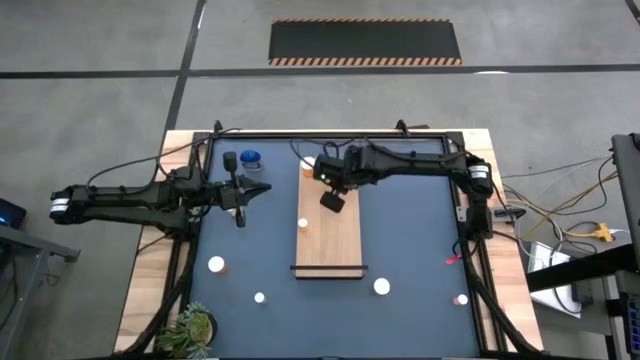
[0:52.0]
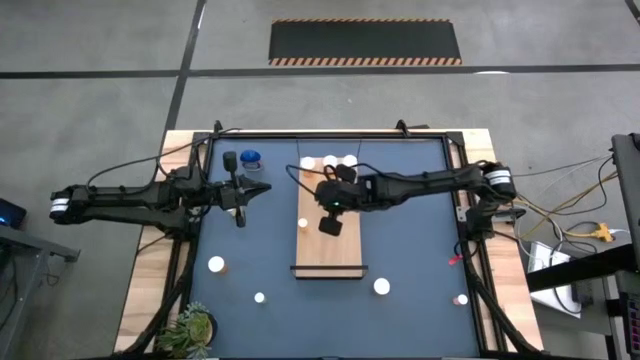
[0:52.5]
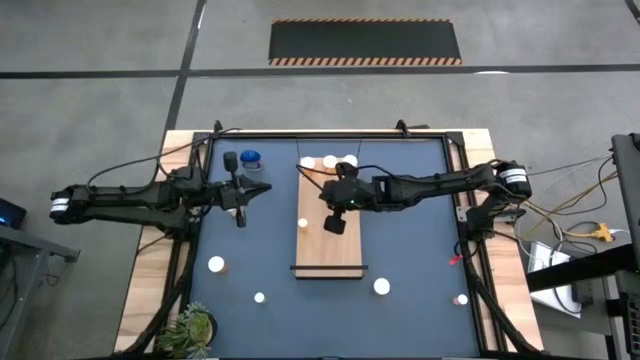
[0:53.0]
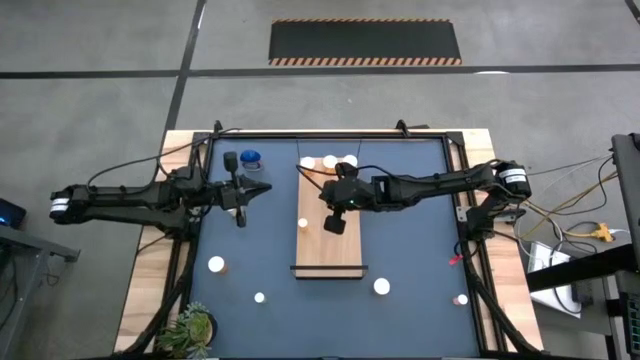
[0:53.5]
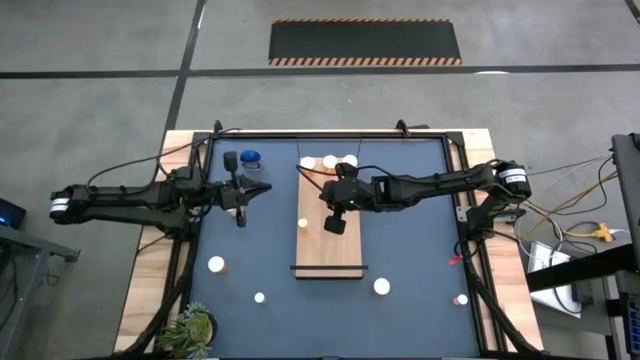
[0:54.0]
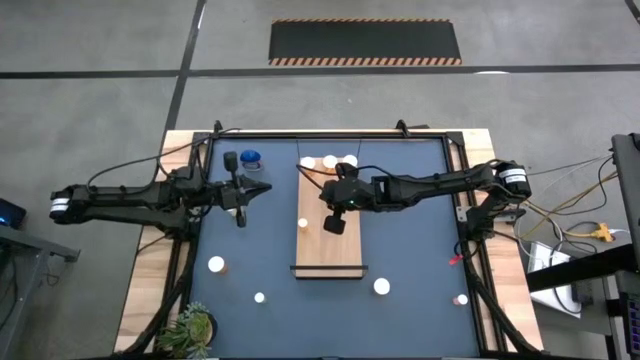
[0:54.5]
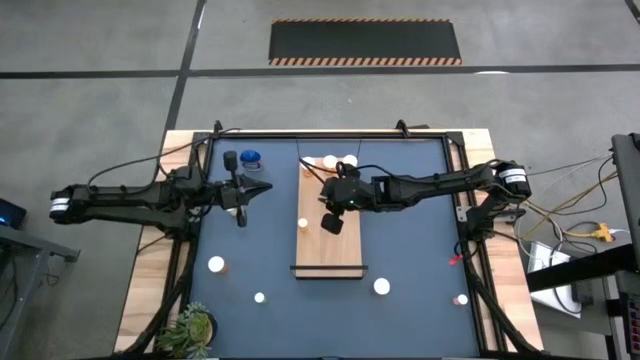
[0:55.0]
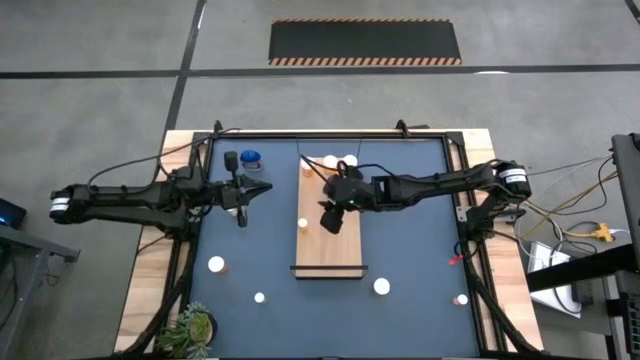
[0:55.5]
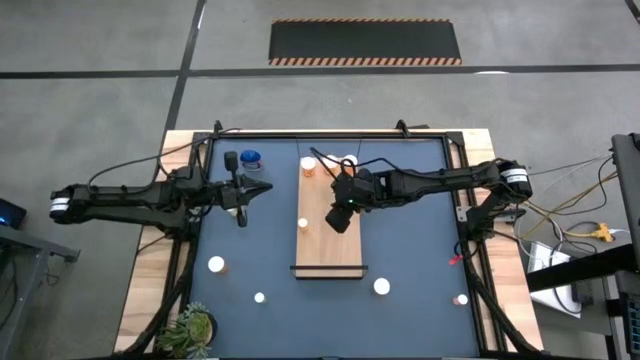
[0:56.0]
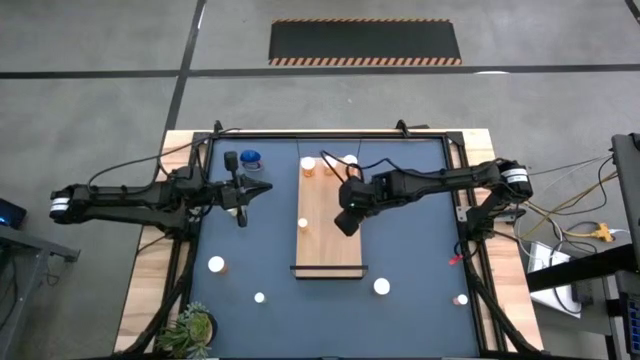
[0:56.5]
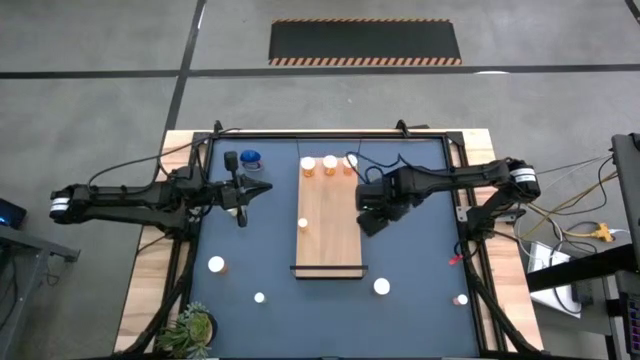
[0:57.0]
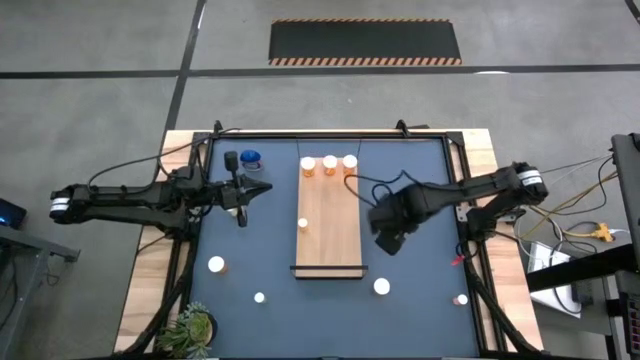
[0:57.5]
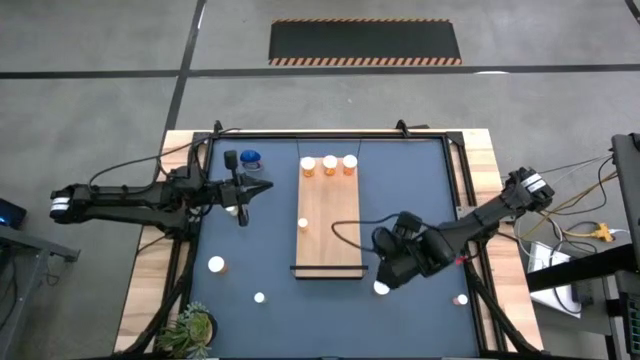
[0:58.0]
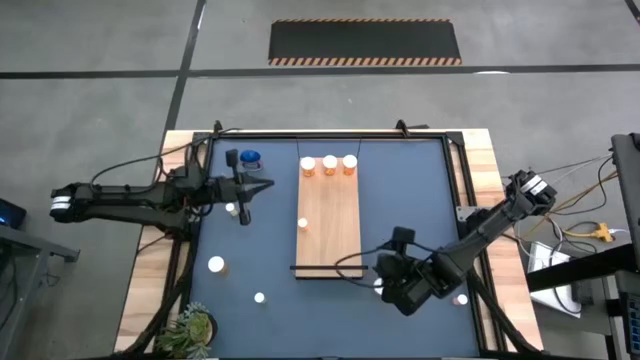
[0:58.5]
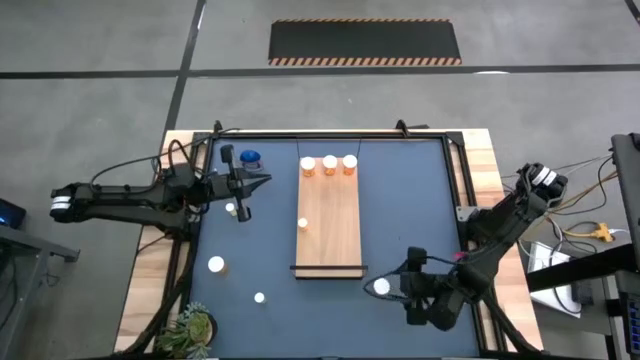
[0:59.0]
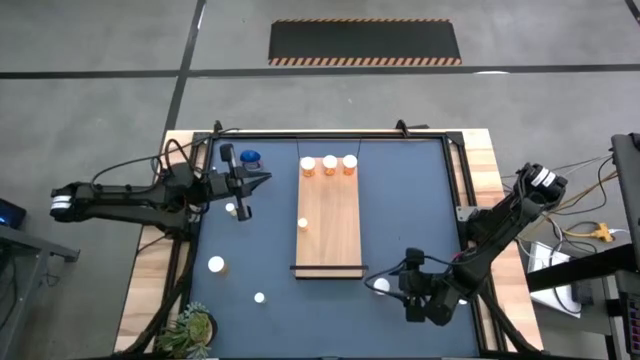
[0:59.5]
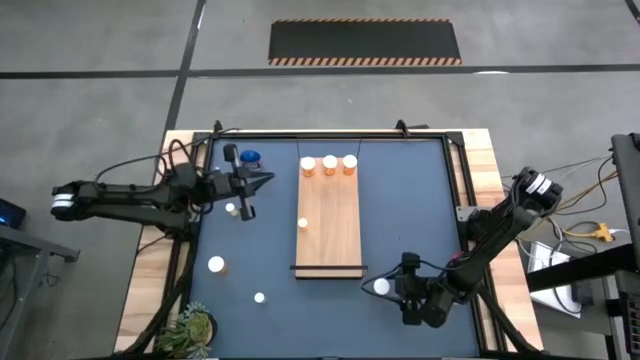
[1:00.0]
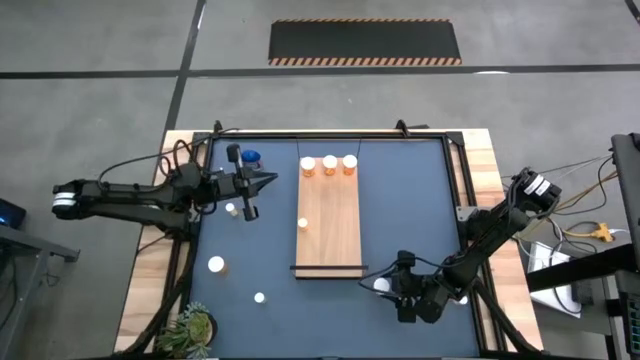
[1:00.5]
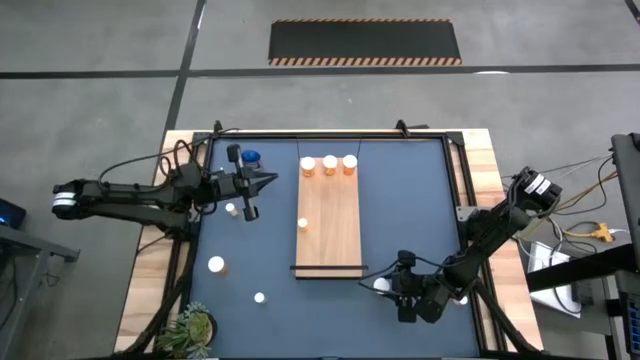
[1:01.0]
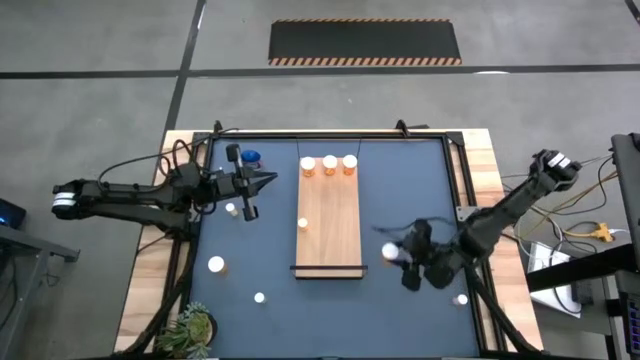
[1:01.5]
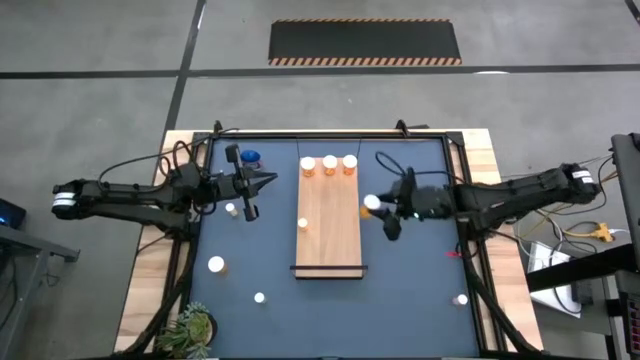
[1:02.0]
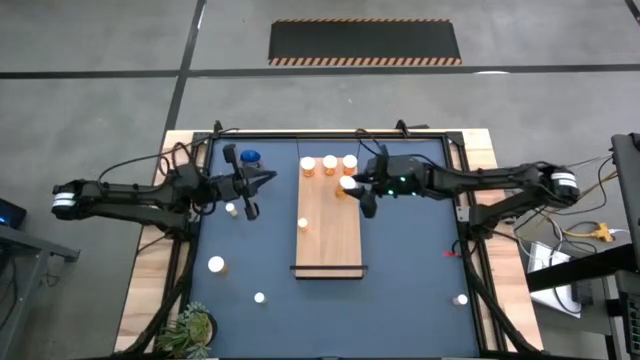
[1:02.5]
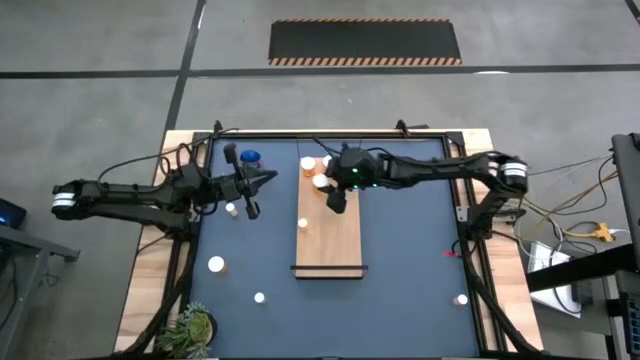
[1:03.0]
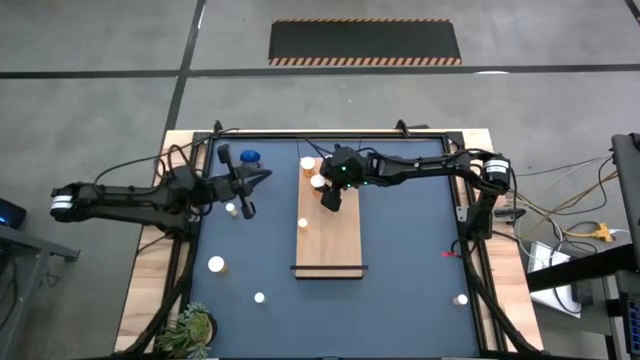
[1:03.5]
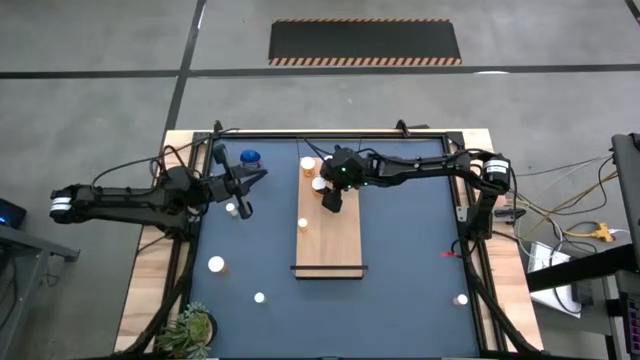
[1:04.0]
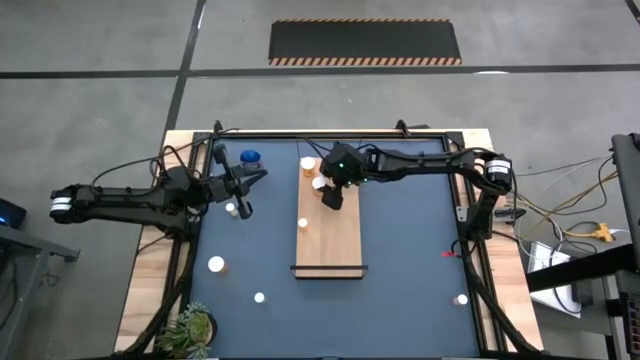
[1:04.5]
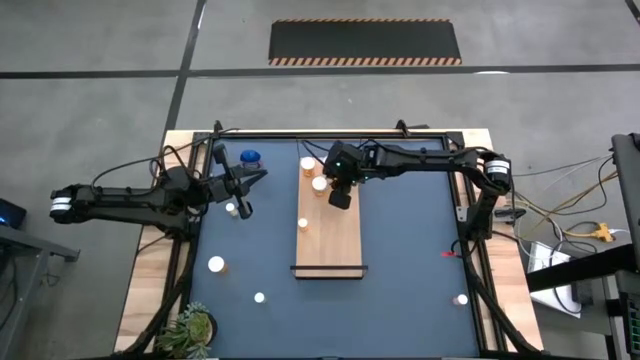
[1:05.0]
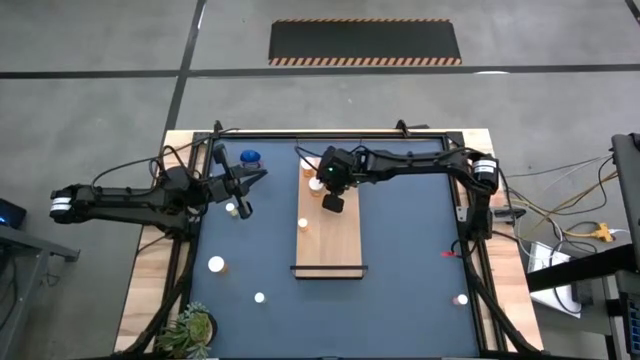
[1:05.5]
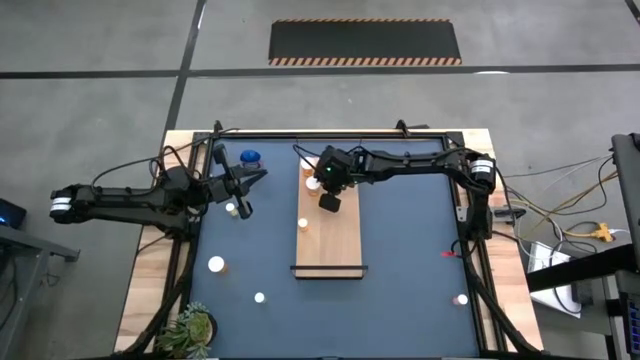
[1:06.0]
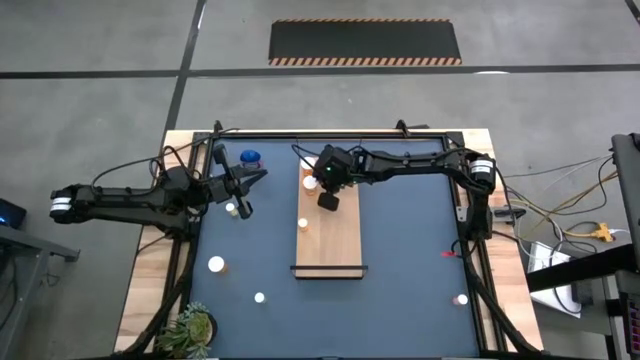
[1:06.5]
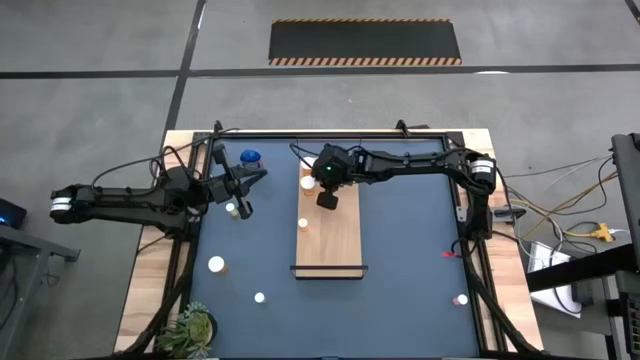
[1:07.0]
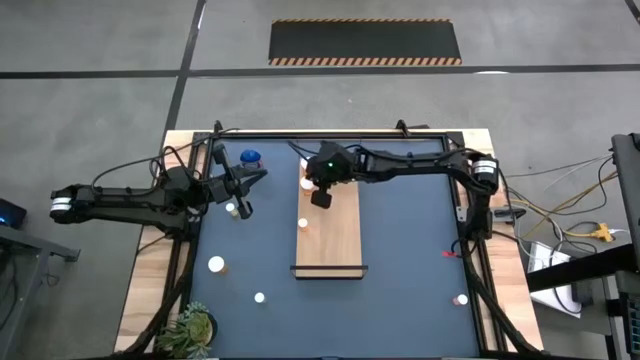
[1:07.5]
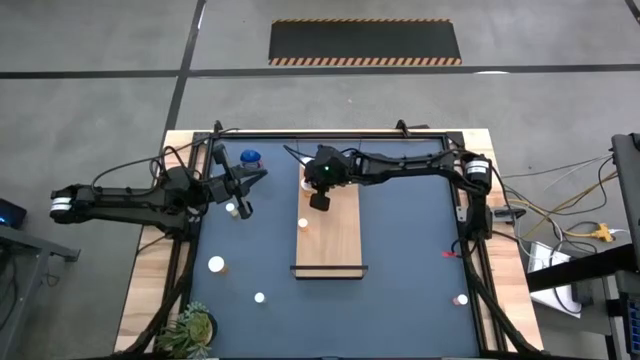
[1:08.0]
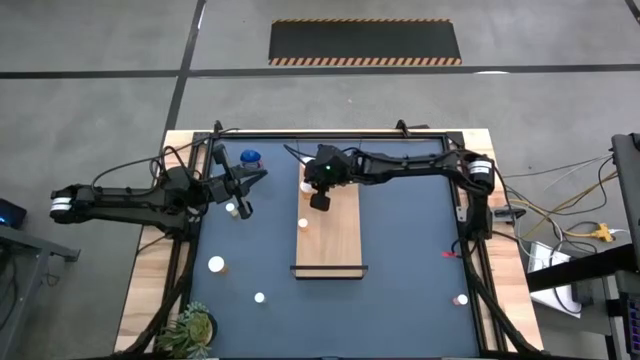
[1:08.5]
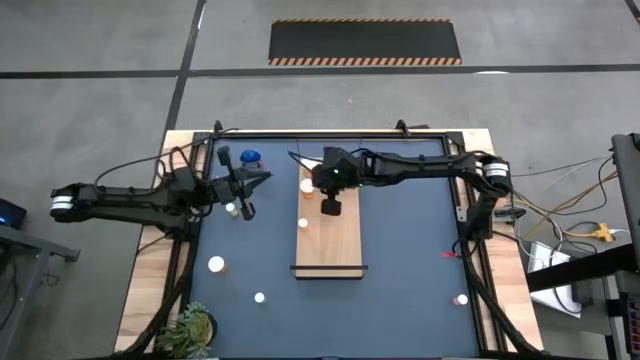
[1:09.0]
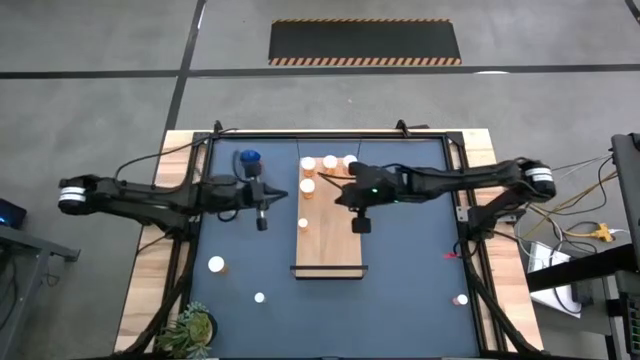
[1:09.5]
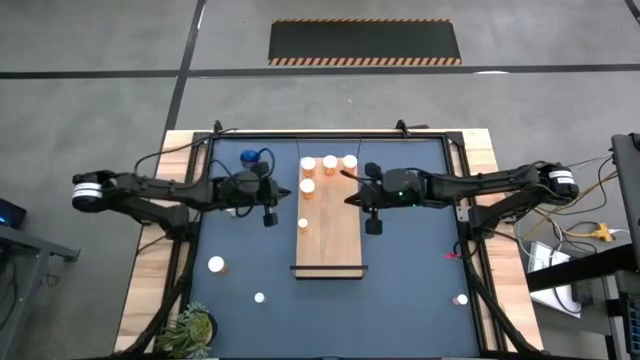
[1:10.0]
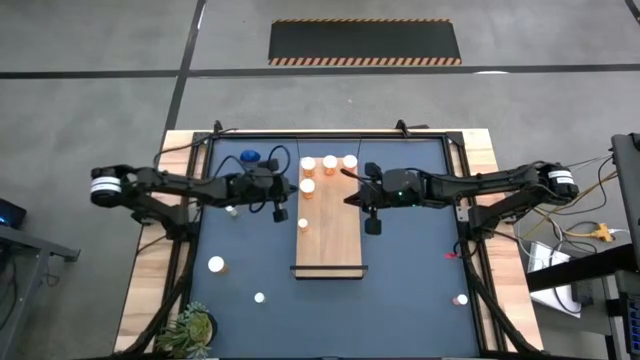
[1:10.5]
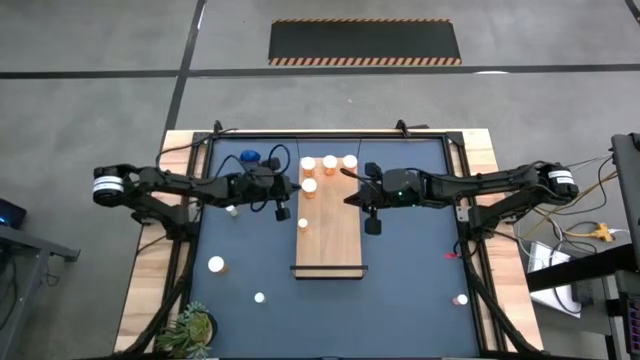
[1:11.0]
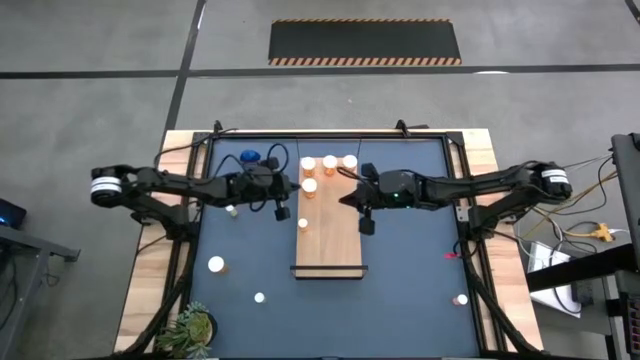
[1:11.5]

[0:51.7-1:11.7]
Task: Pick and place medicine bottles onto shelf by color
Put the big orange pill bottle on the shelf aligned with the big orange pill bottles

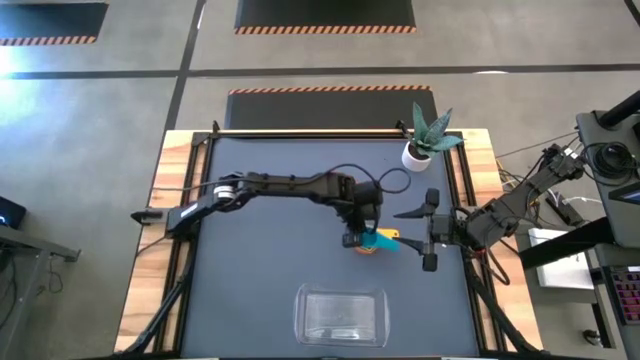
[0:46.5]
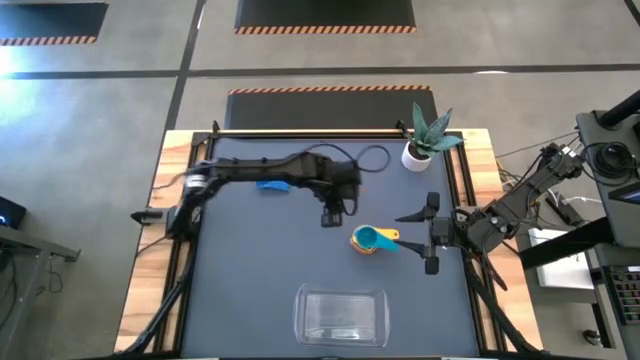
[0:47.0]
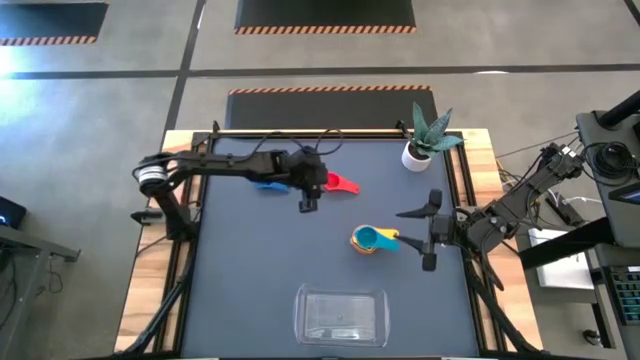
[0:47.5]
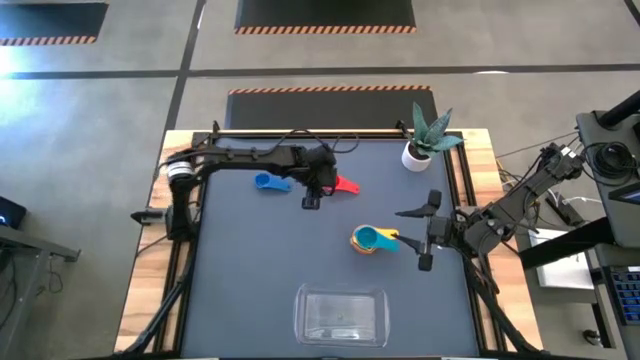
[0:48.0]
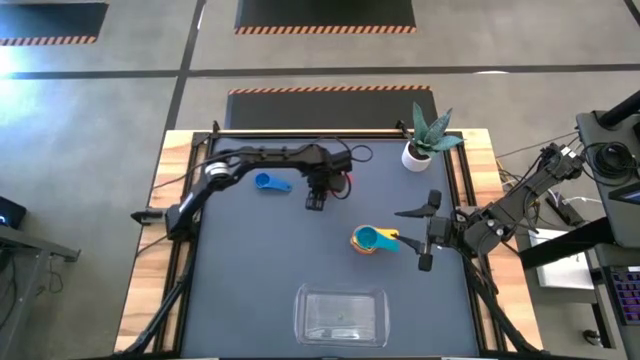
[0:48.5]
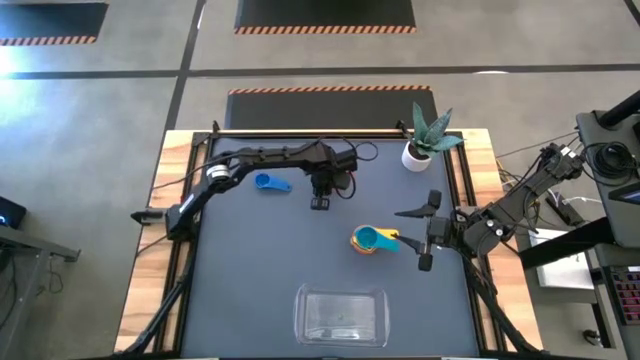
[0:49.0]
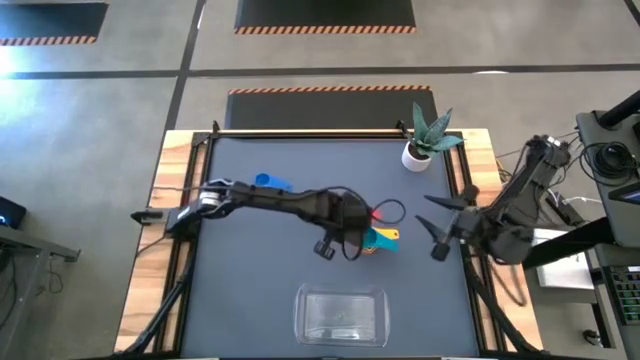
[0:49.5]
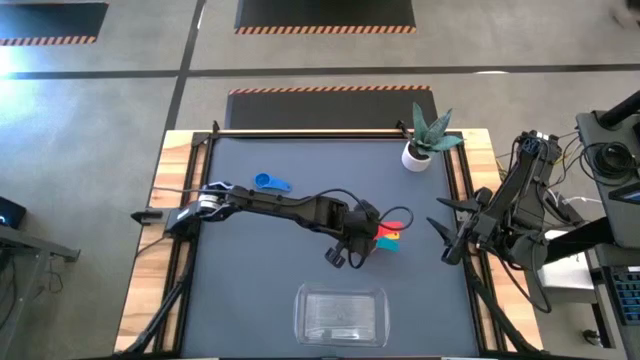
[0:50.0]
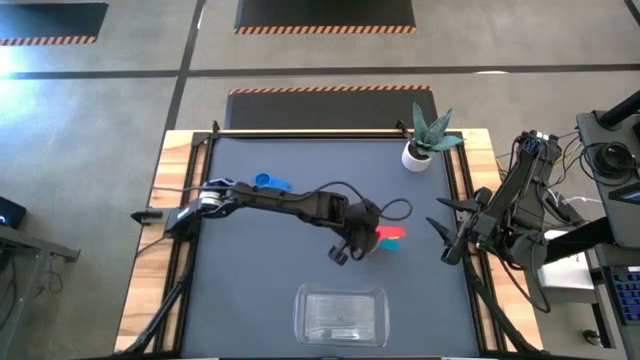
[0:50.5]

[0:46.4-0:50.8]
Task: Nest measuring cups in basket
Stack the red measuring cup into the light blue measuring cup
